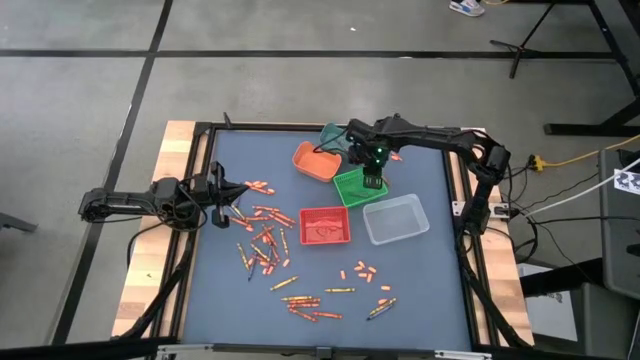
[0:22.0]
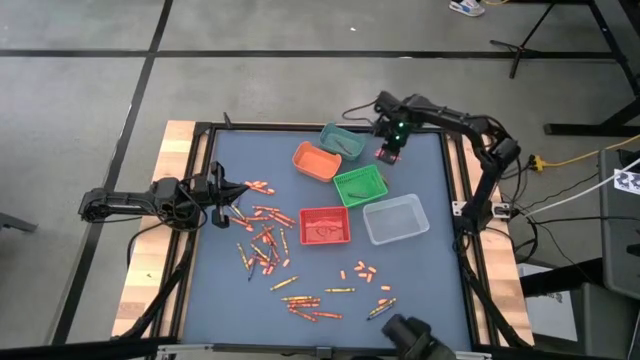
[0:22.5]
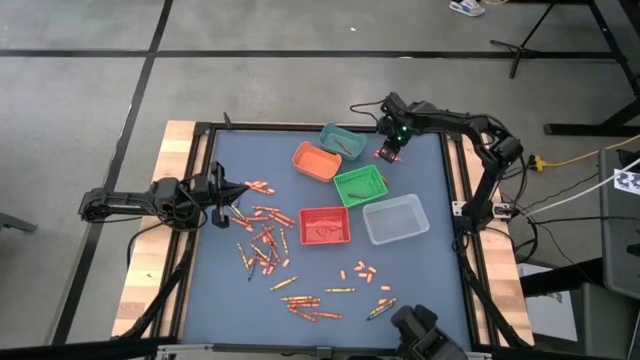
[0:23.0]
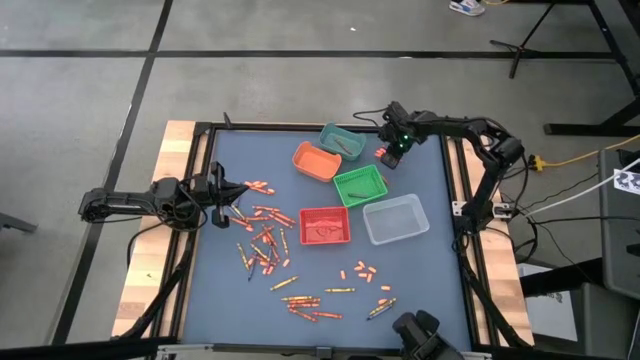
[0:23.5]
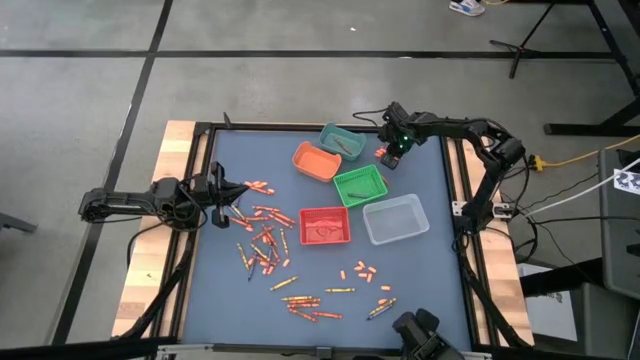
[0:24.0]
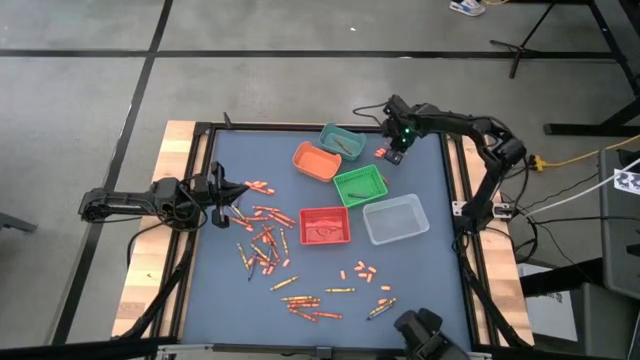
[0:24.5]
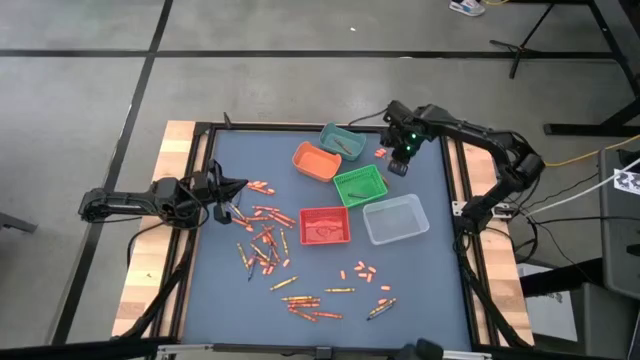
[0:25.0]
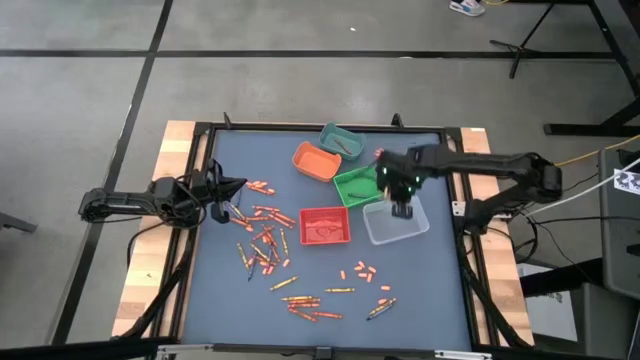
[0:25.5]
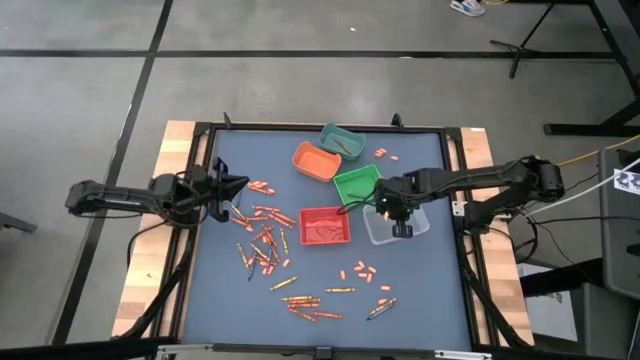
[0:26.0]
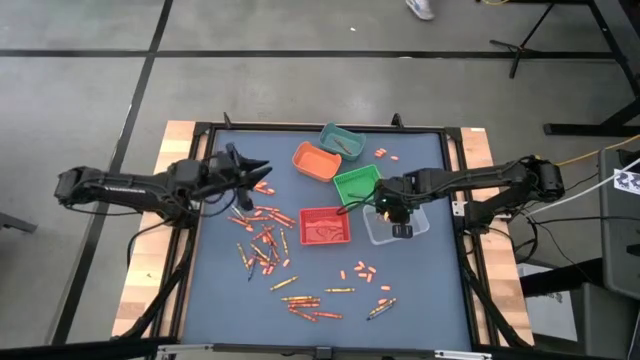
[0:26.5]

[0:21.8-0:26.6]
Task: Sort crayons
Put the light orange crayon into the transparent bin

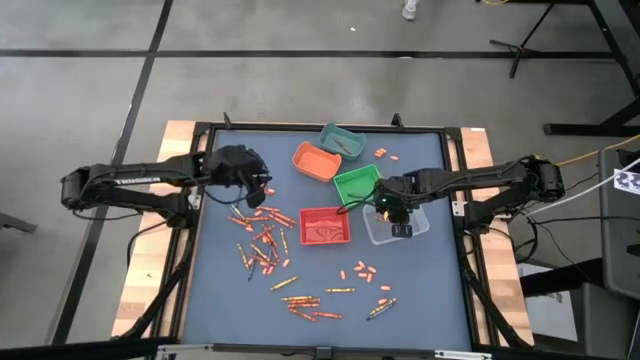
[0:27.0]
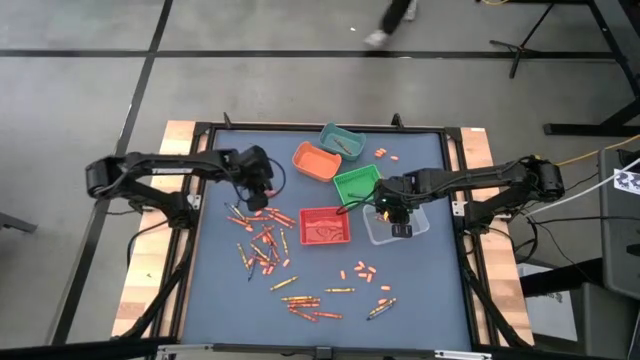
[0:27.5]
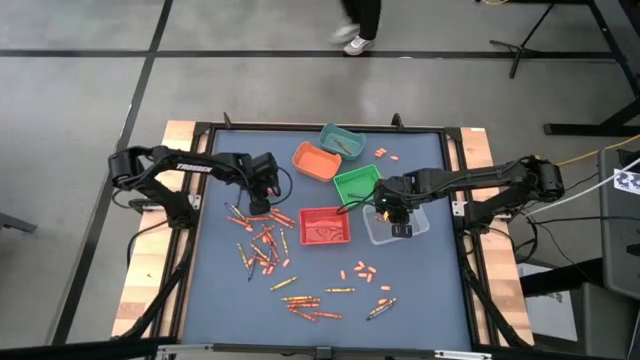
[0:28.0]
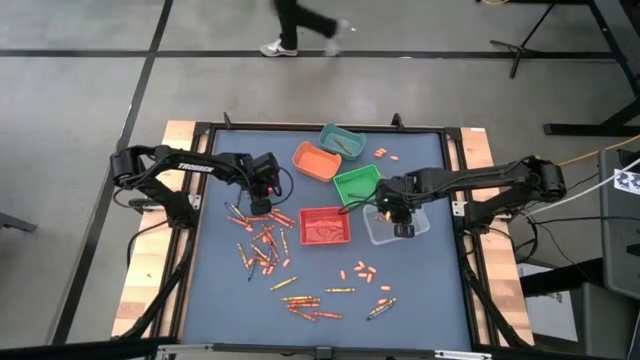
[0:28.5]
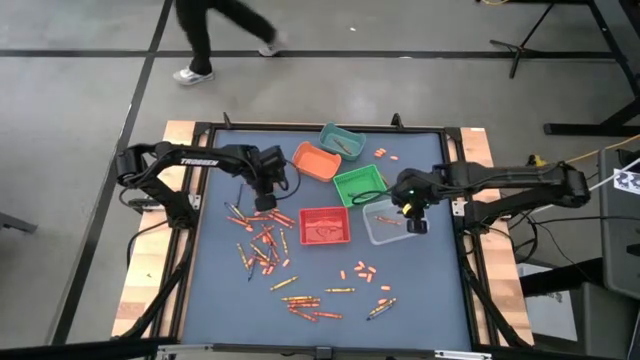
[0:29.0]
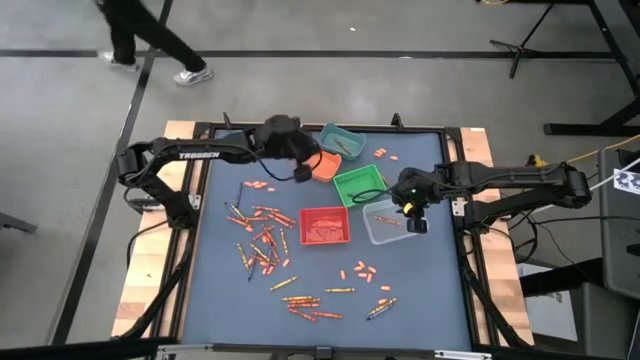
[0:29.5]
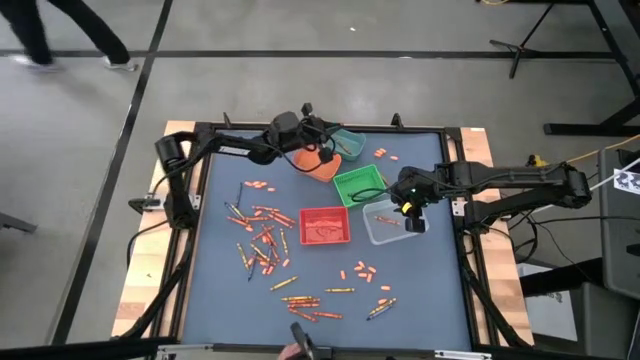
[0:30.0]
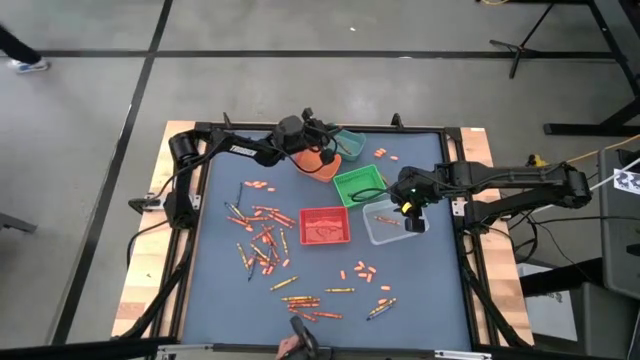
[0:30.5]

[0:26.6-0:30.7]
Put the red orange crayon into the blue bin

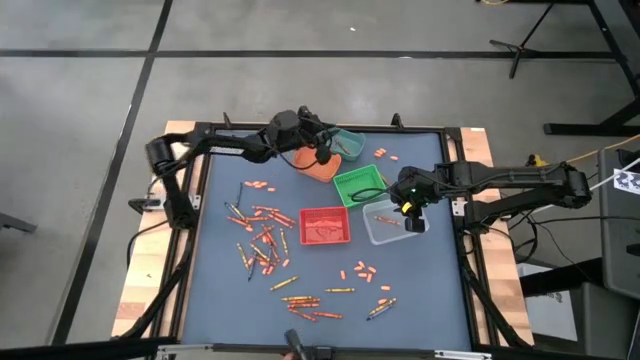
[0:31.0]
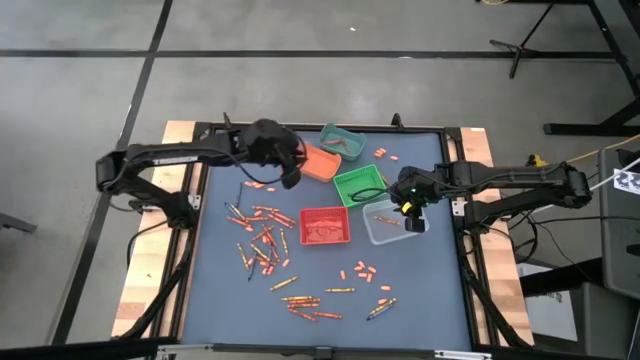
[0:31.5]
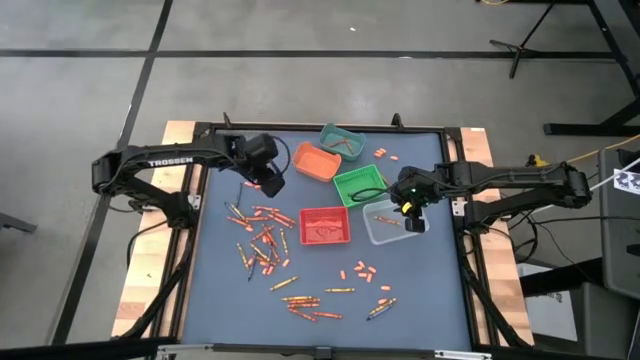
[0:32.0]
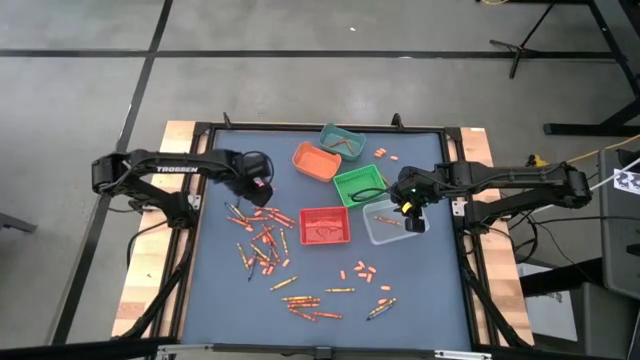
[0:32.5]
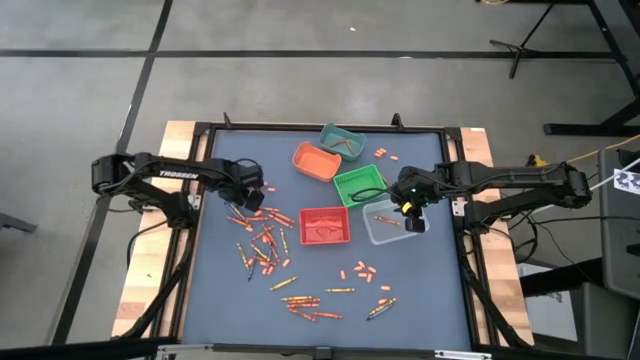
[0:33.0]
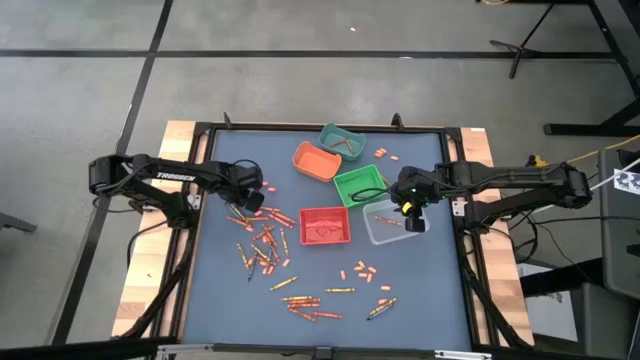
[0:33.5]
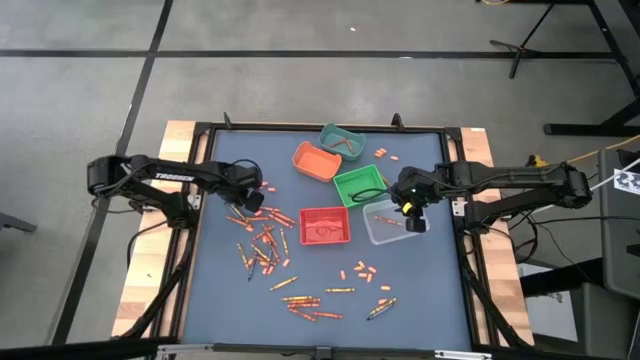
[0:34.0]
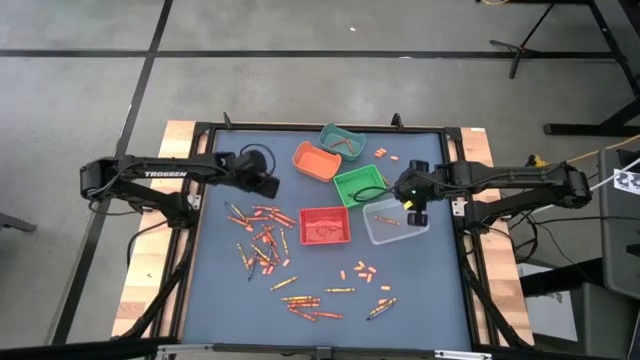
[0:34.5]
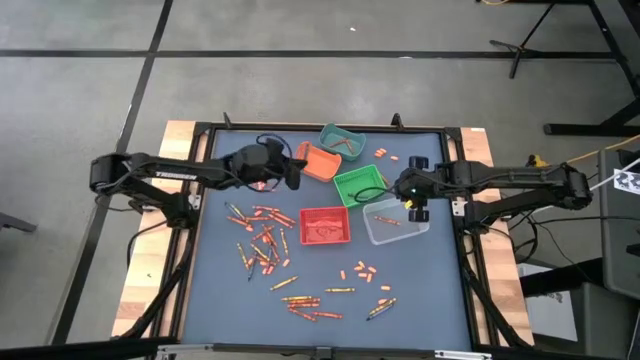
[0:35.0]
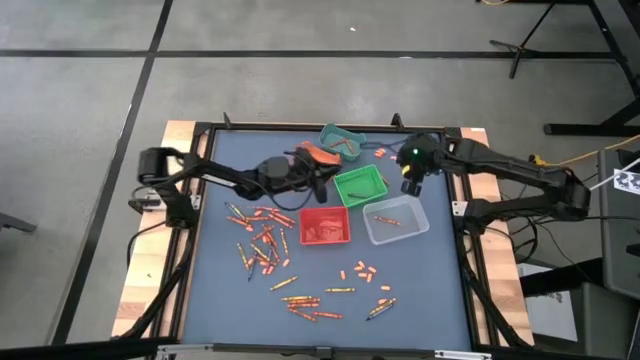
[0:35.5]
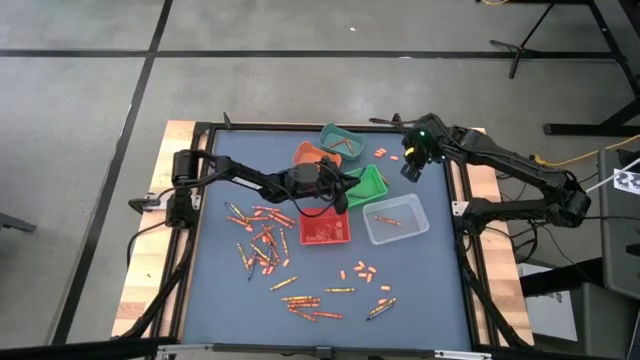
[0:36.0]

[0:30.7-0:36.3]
Put the blue crayon into the green bin

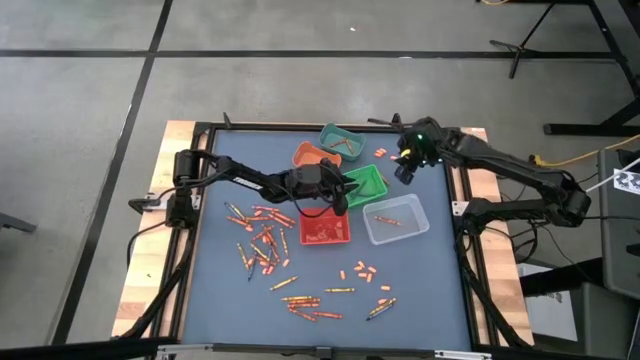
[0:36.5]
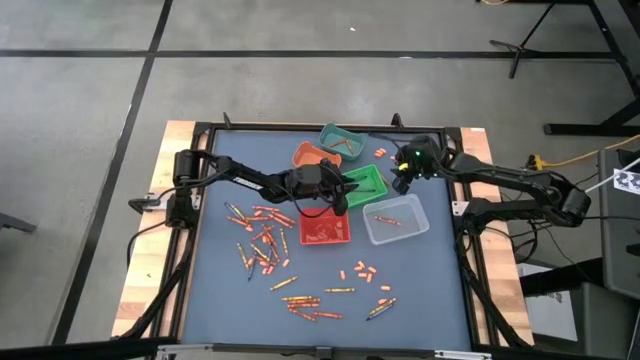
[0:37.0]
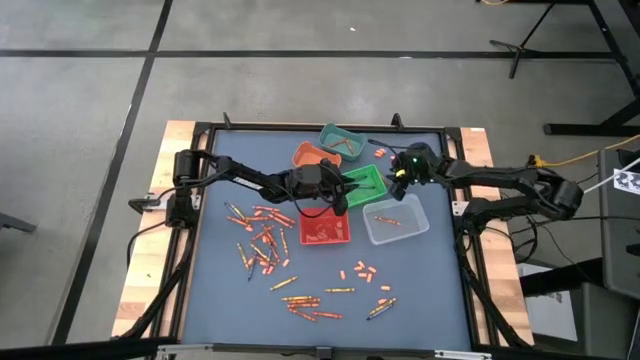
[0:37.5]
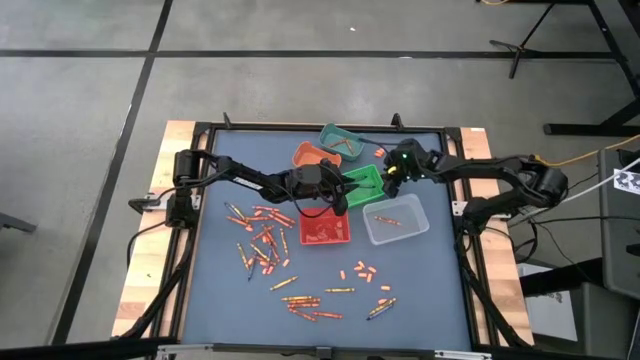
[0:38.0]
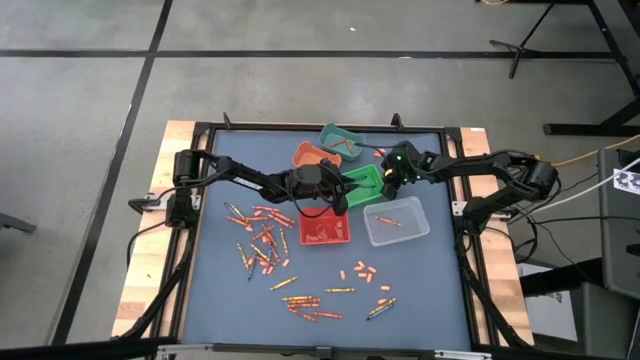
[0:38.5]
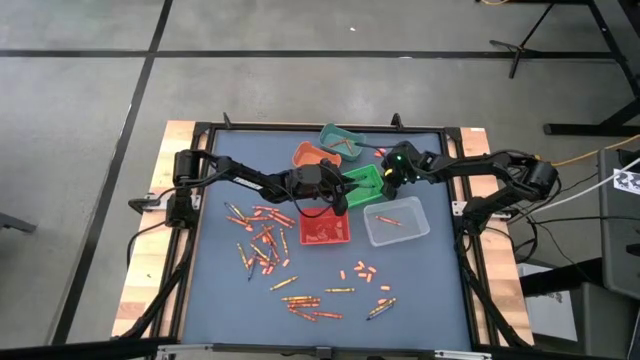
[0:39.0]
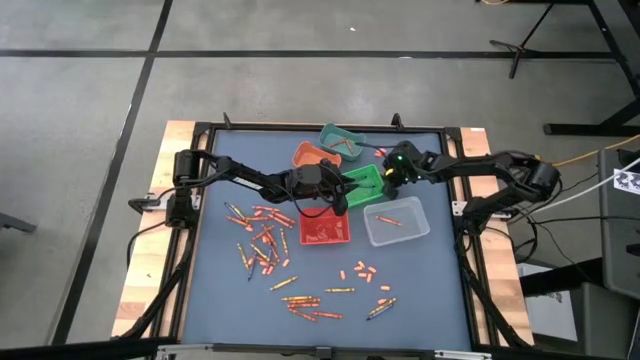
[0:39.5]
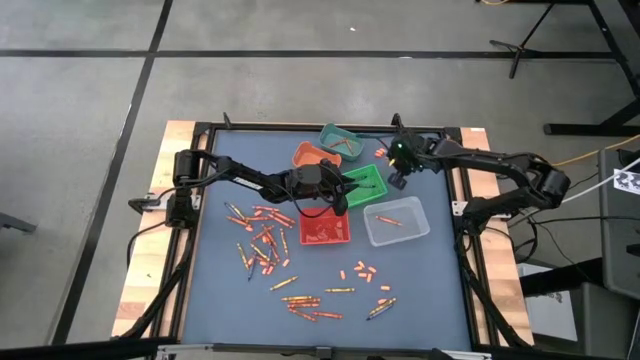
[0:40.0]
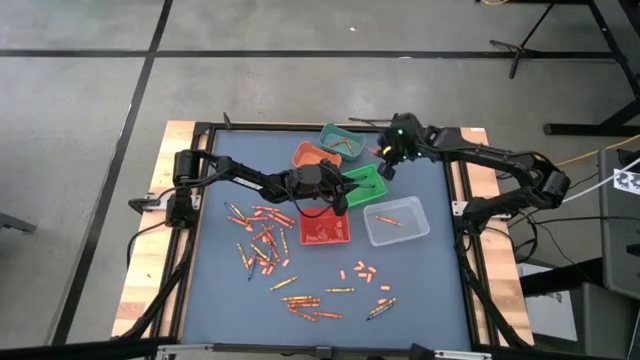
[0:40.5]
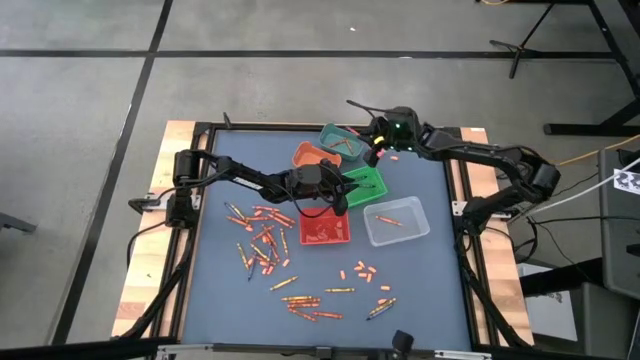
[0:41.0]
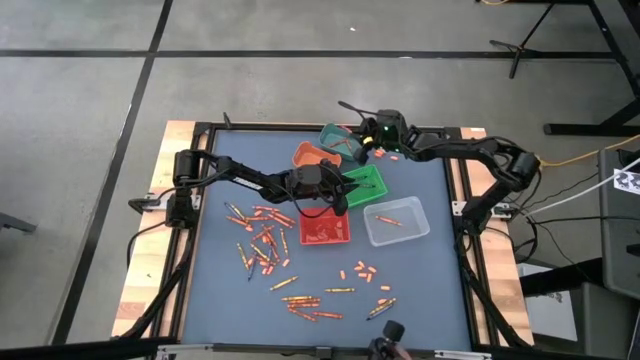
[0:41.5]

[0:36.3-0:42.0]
Put the red orange crayon into the blue bin
